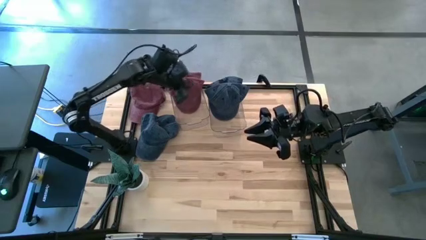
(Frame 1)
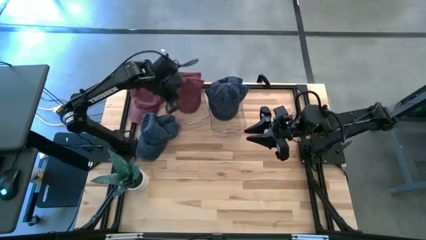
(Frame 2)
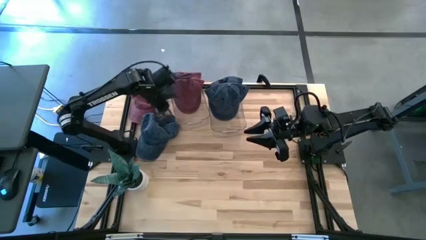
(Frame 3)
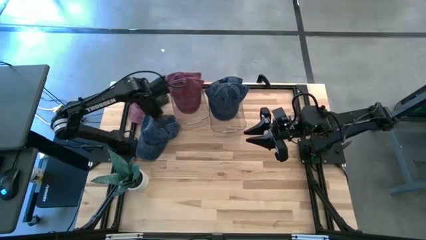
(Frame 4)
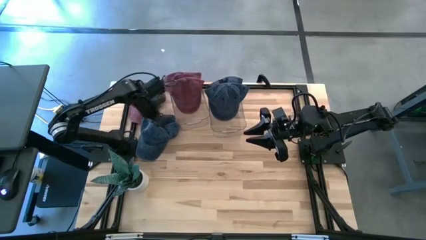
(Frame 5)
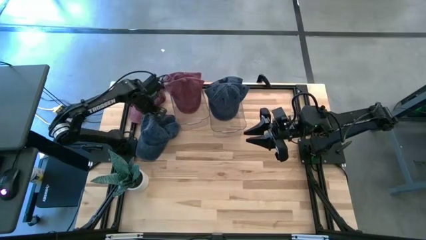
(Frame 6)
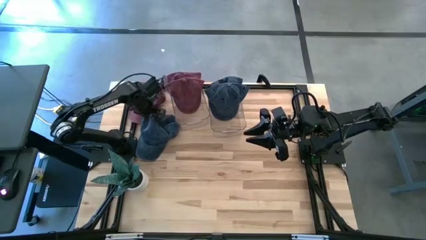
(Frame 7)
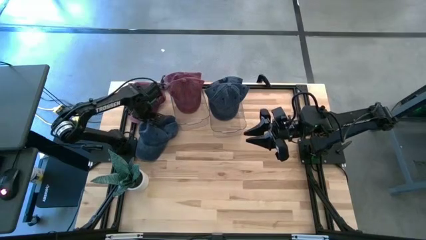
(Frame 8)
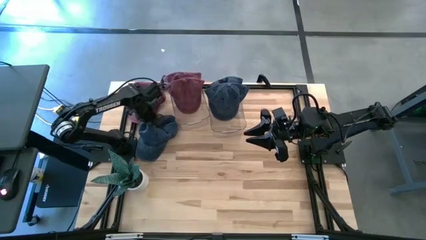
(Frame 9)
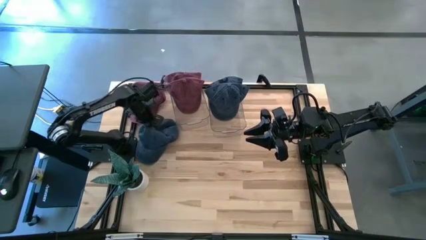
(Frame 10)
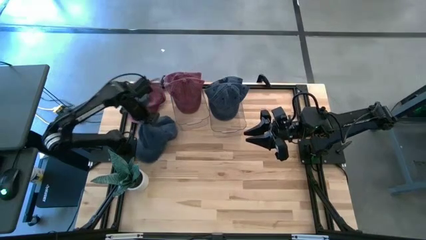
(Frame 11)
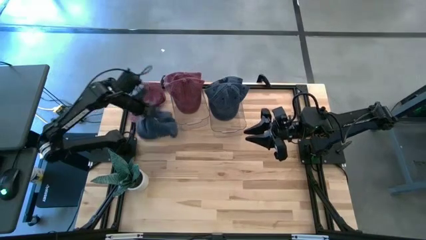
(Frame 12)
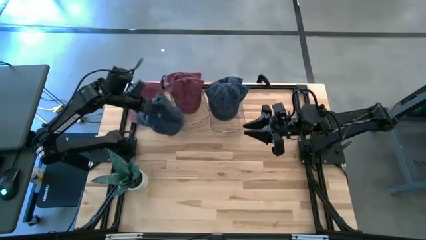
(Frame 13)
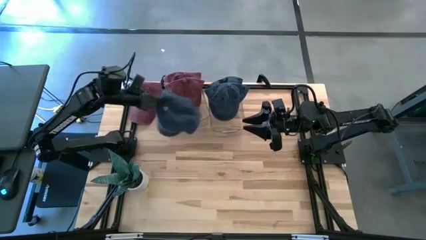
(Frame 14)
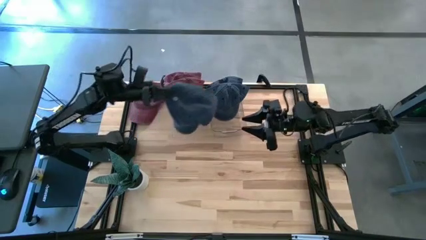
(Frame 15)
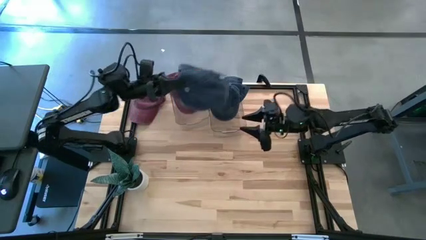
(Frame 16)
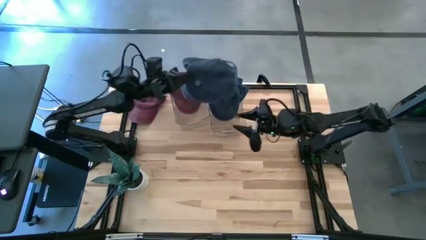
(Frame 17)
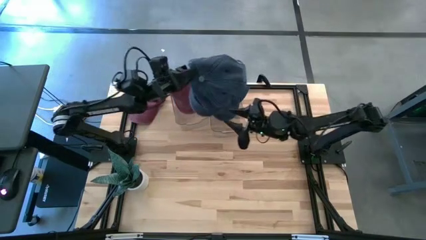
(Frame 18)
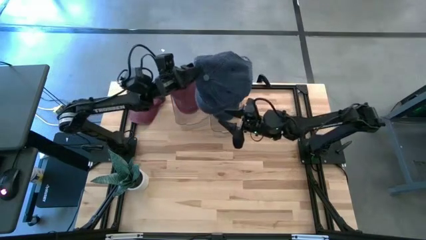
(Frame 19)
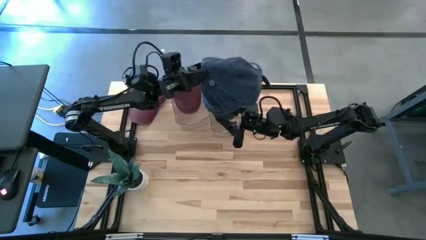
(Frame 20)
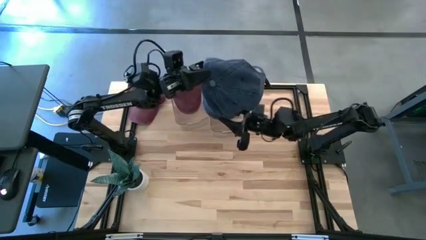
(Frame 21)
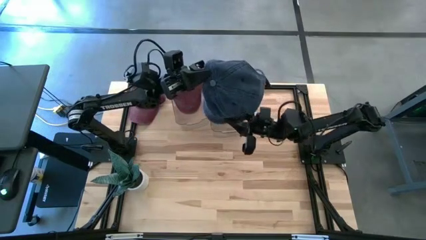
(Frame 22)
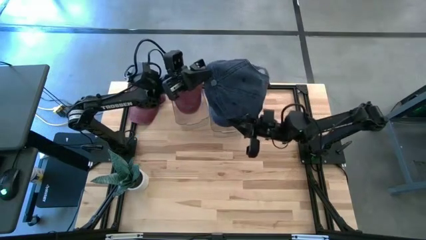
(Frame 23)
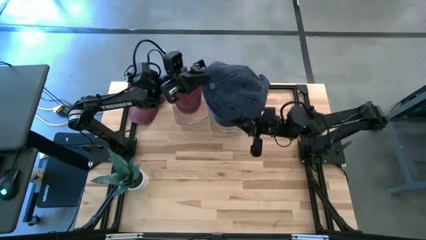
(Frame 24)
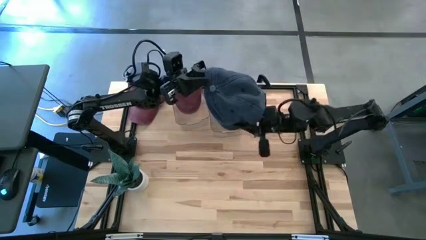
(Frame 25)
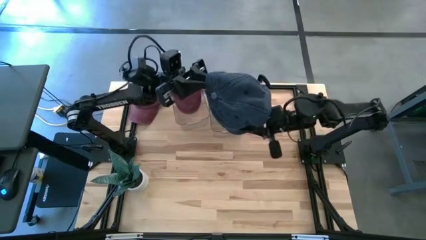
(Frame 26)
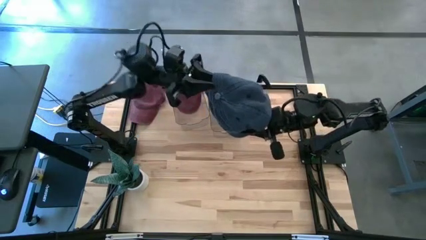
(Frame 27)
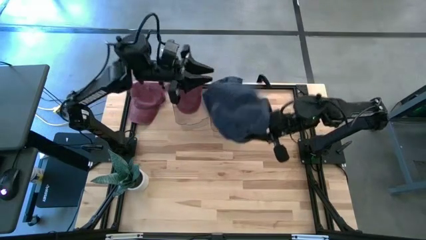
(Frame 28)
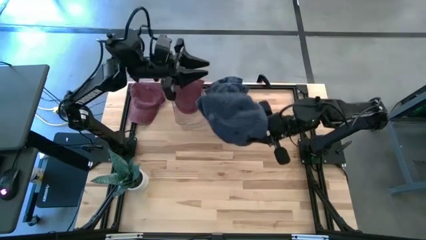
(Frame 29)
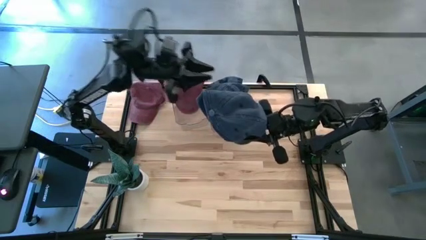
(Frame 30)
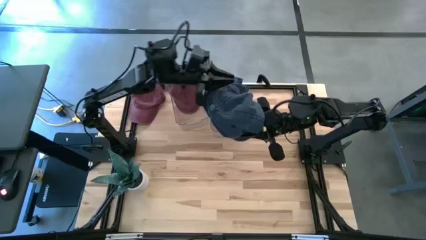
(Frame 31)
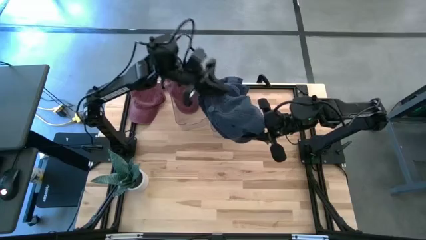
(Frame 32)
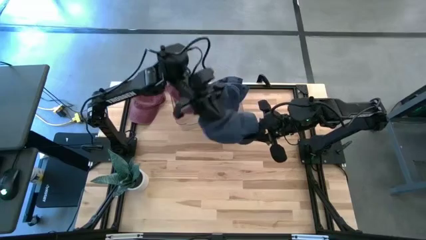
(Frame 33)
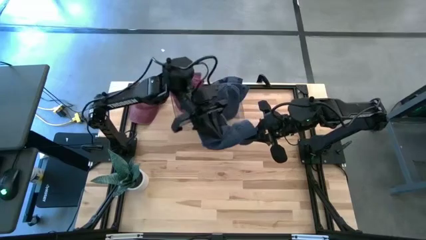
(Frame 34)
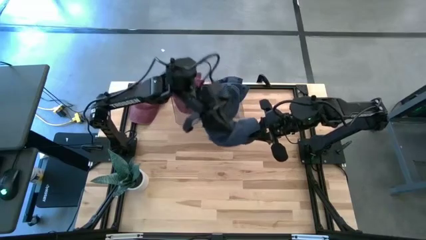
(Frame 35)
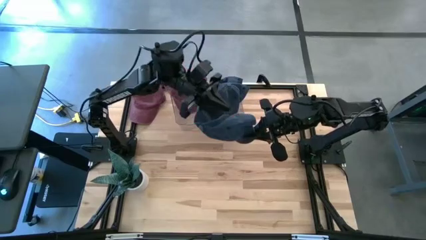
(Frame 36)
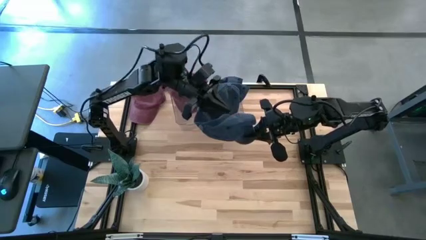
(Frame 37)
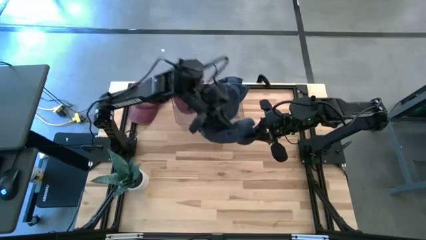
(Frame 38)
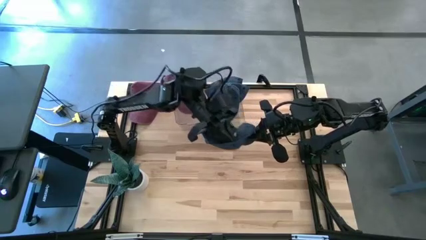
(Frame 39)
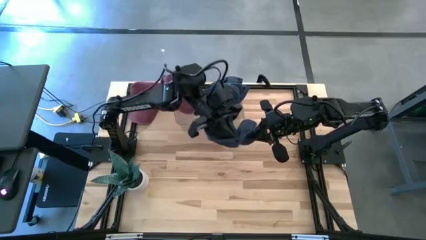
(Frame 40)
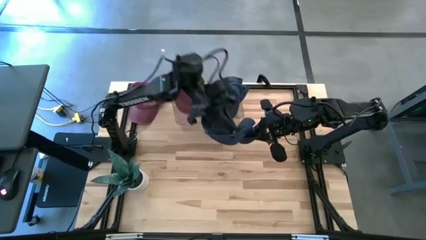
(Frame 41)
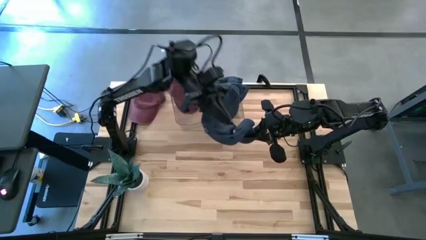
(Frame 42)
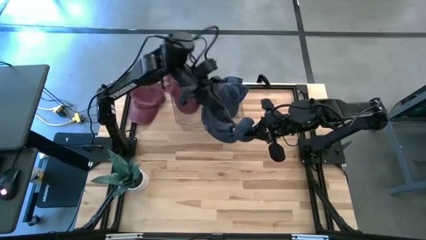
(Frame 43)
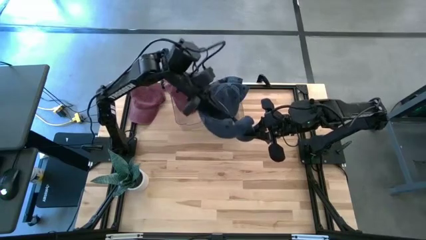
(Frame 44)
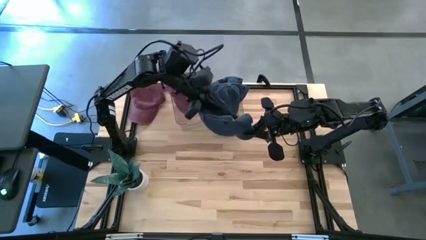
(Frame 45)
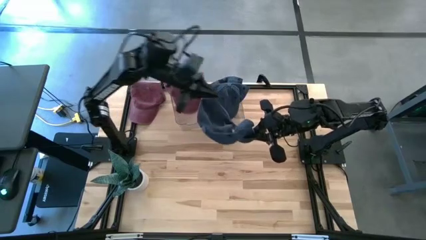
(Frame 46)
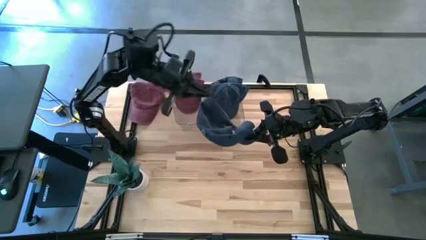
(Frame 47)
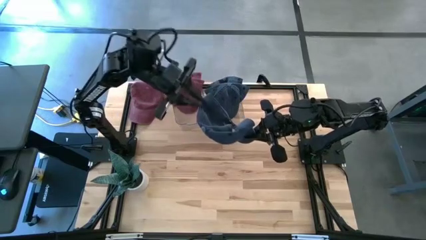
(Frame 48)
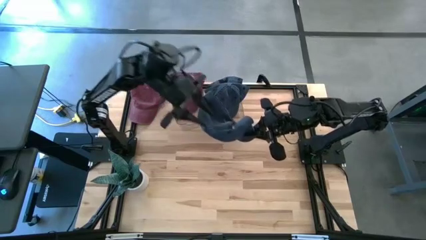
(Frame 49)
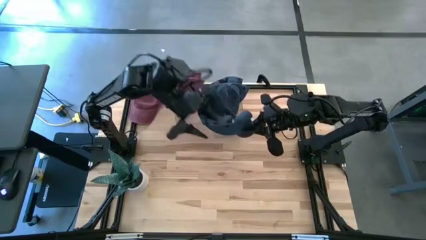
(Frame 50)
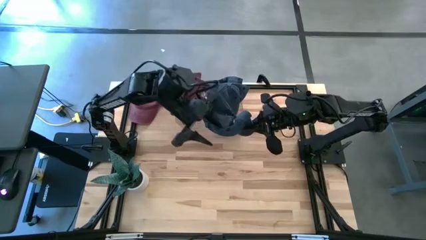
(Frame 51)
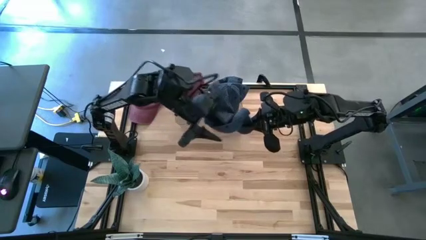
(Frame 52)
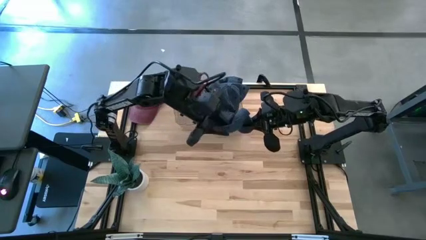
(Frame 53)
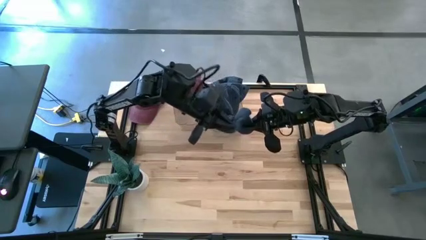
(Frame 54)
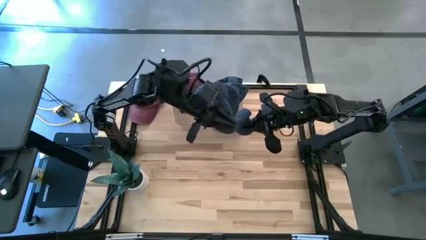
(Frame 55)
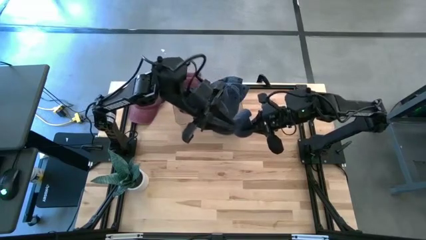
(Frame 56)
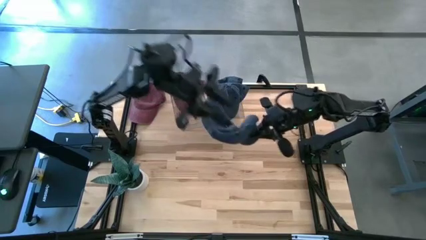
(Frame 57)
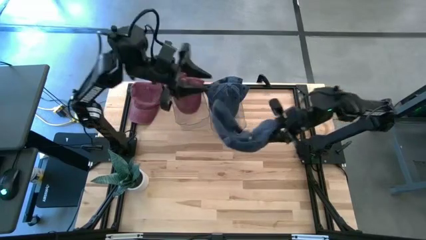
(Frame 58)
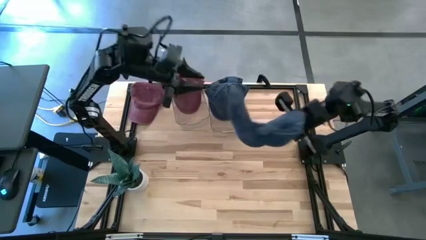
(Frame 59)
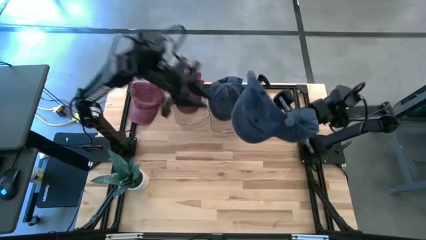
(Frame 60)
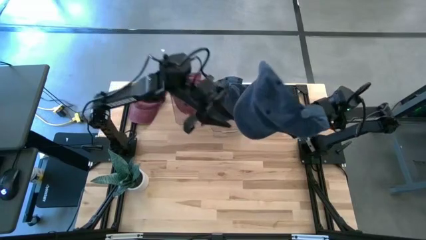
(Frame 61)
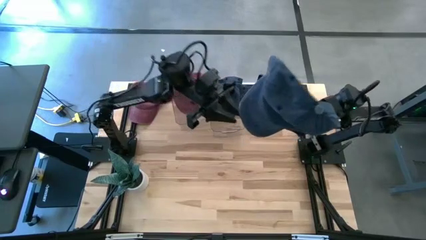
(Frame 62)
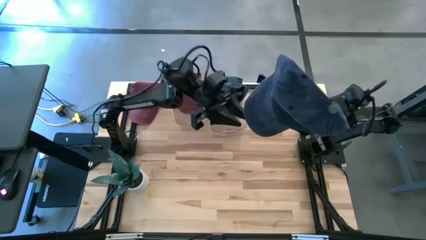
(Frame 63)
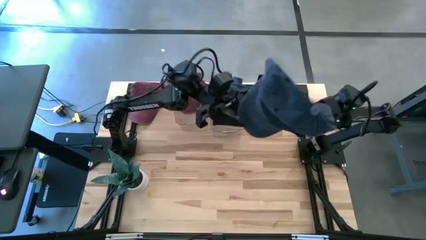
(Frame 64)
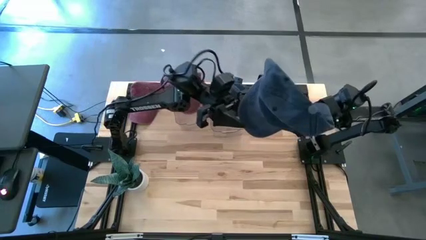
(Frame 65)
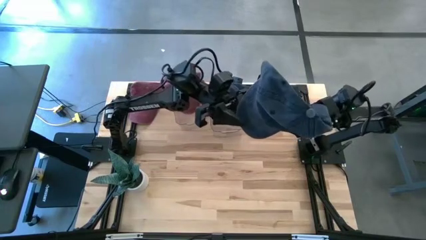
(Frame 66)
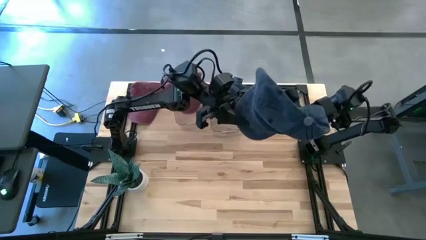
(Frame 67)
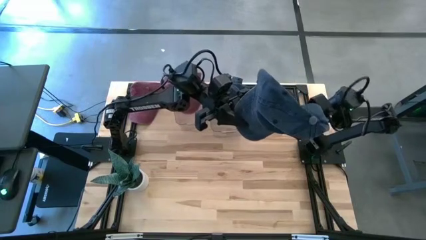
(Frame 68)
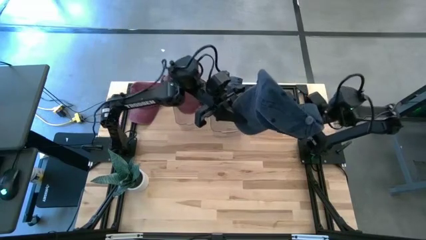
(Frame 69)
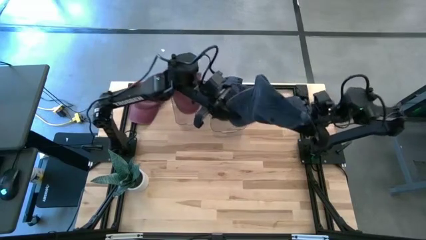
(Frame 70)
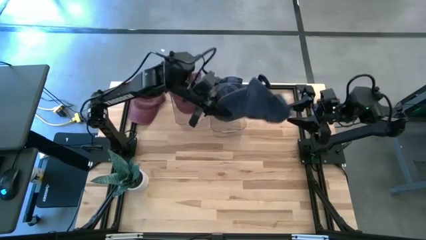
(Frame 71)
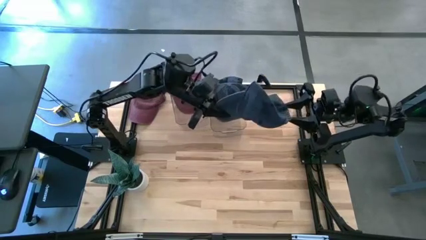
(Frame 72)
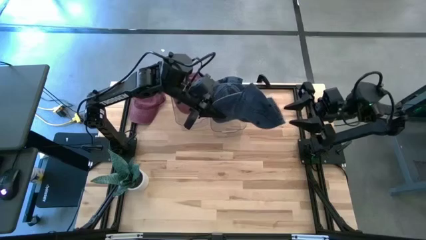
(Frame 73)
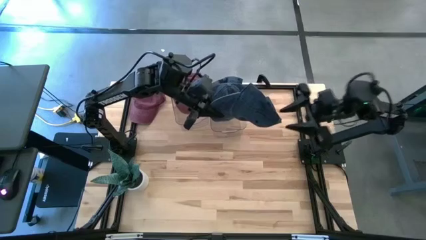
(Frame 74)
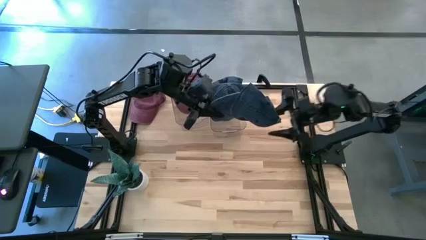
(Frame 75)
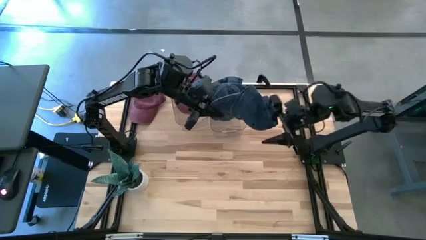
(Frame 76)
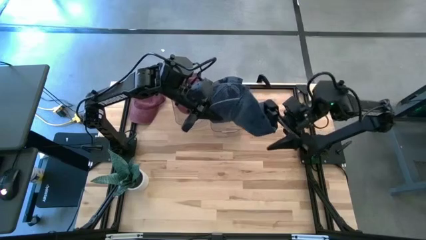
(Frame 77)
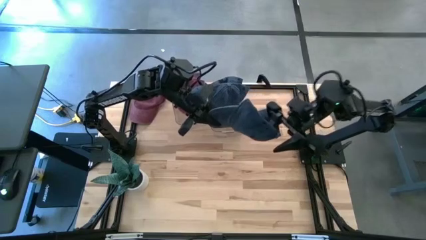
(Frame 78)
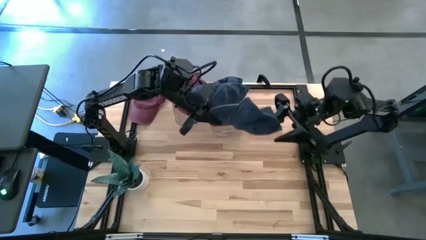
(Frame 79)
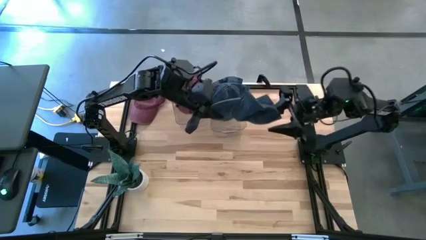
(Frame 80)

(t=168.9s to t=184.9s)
Task: Pick & Place hat
Put the blue cap into the right bin
